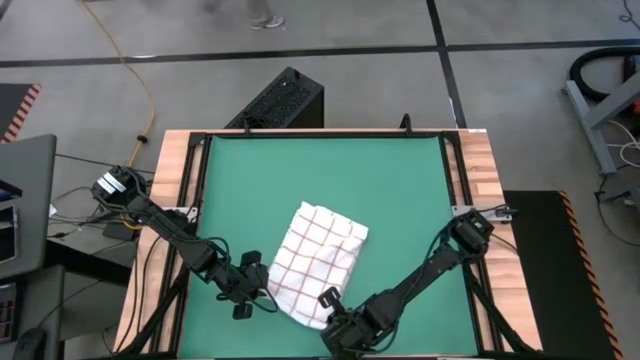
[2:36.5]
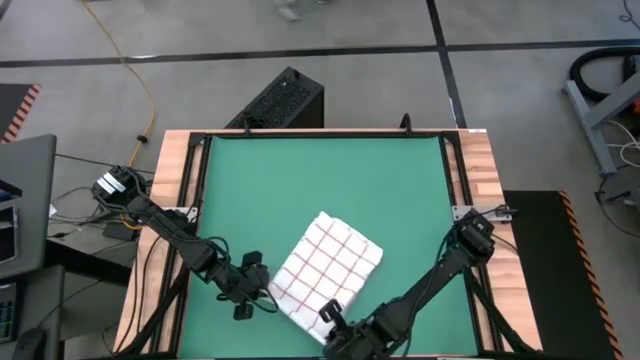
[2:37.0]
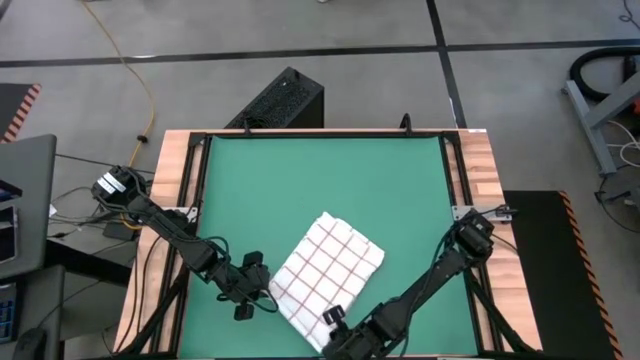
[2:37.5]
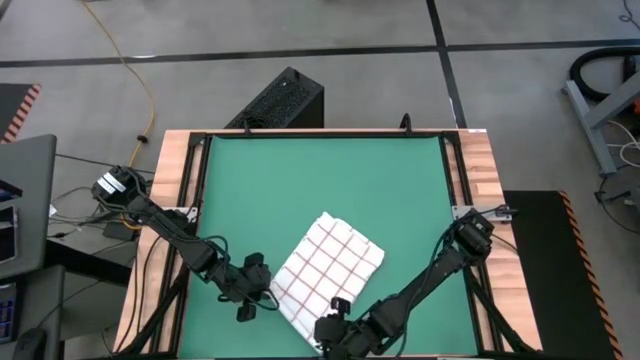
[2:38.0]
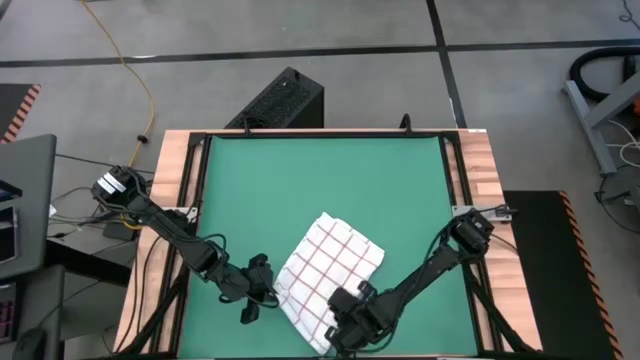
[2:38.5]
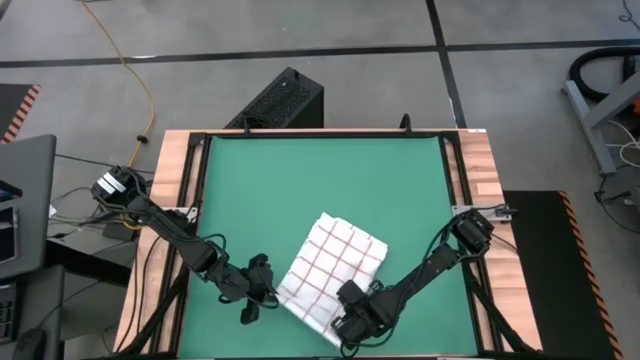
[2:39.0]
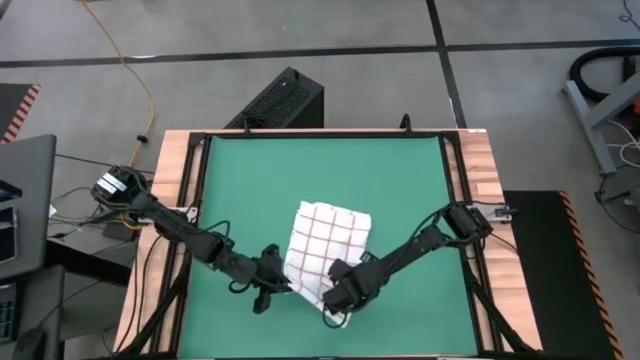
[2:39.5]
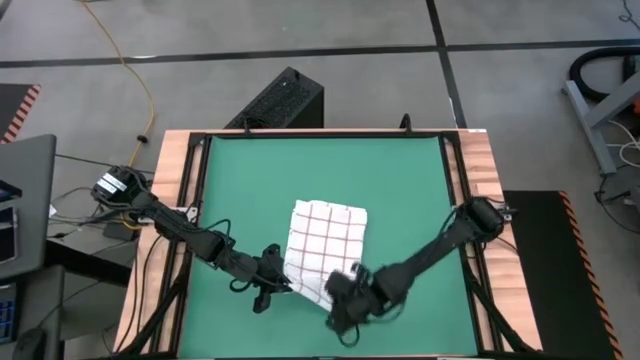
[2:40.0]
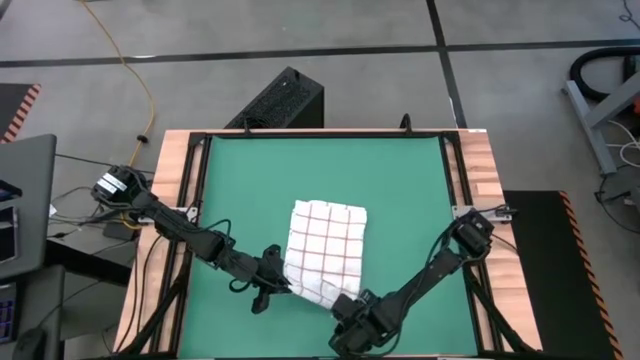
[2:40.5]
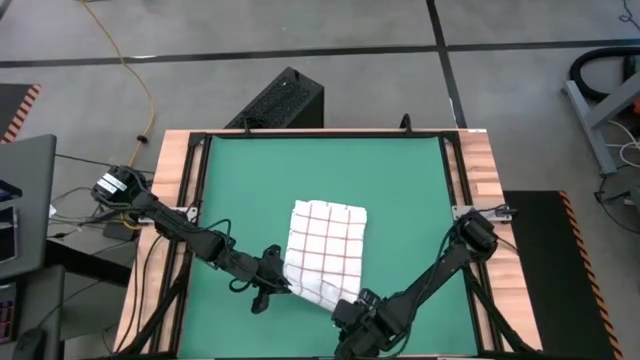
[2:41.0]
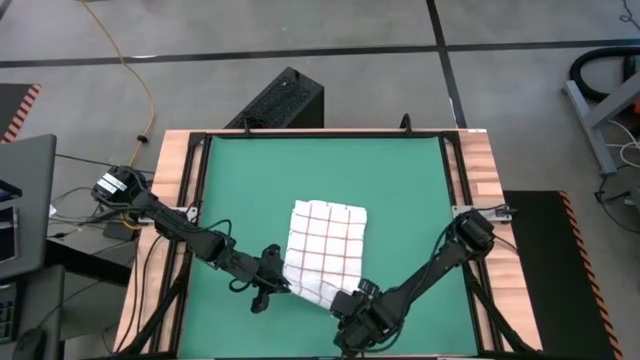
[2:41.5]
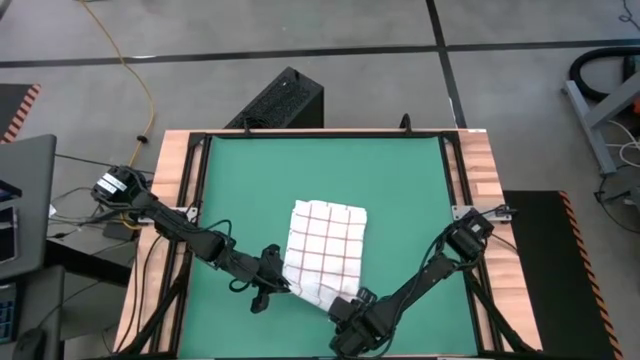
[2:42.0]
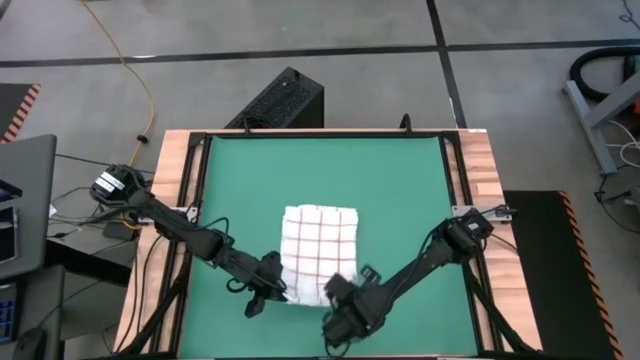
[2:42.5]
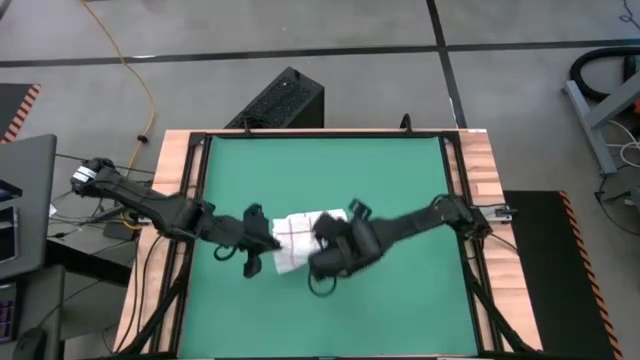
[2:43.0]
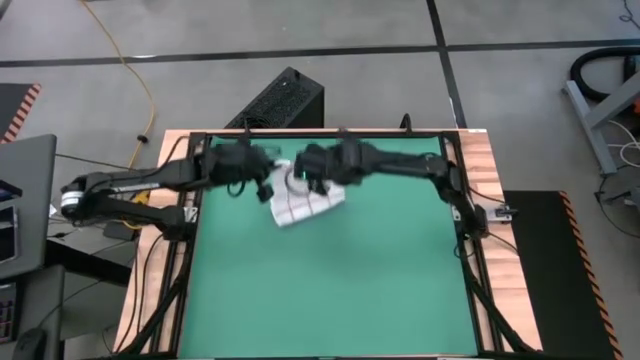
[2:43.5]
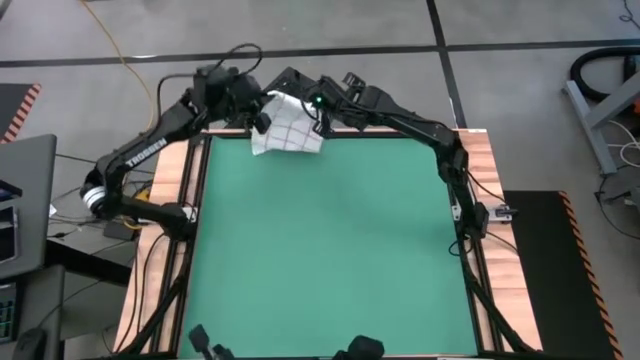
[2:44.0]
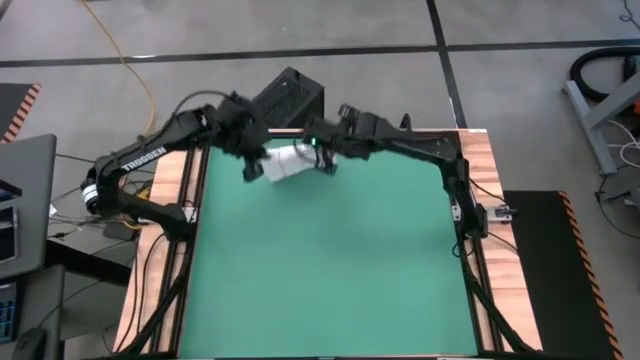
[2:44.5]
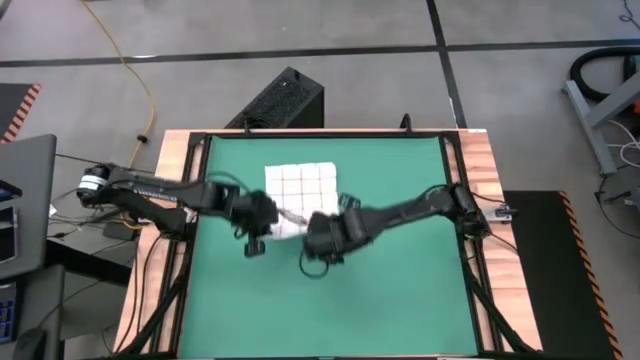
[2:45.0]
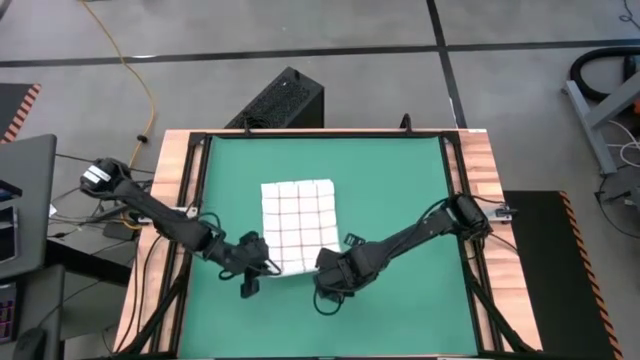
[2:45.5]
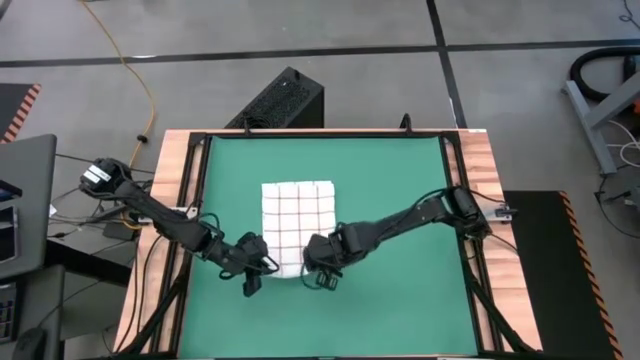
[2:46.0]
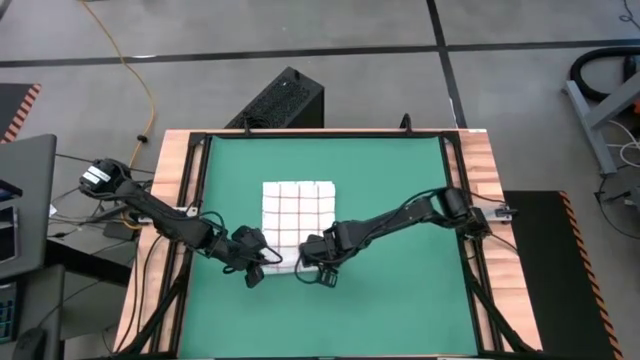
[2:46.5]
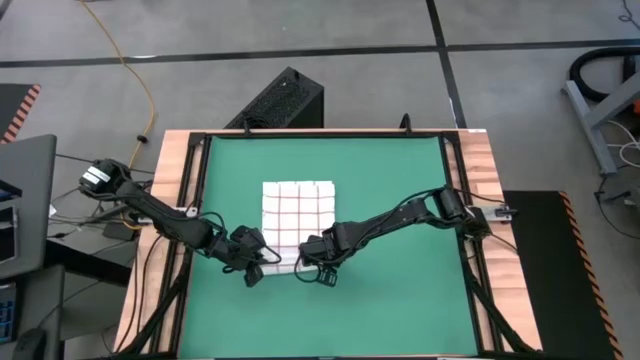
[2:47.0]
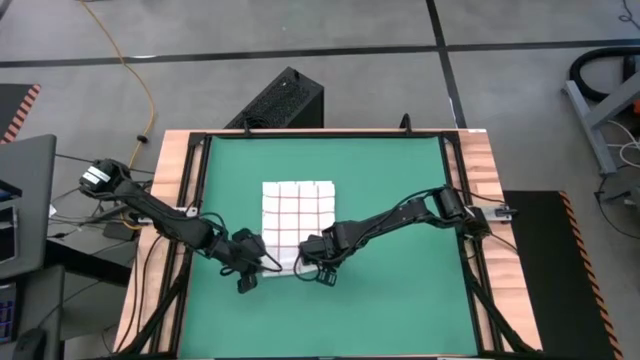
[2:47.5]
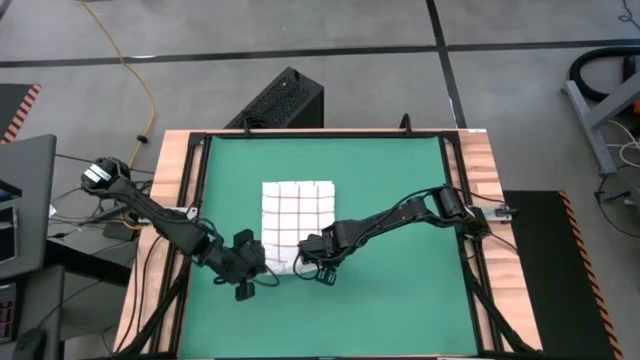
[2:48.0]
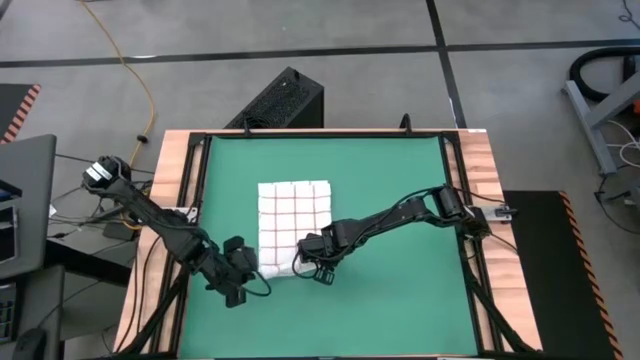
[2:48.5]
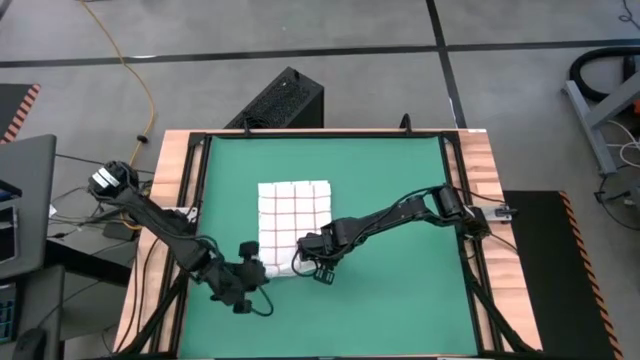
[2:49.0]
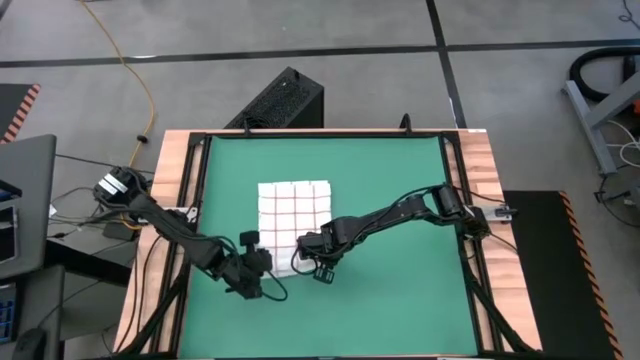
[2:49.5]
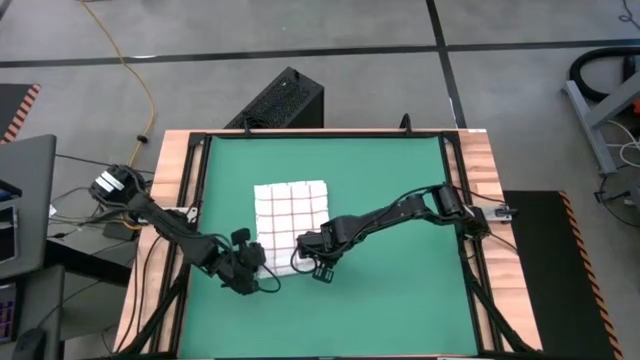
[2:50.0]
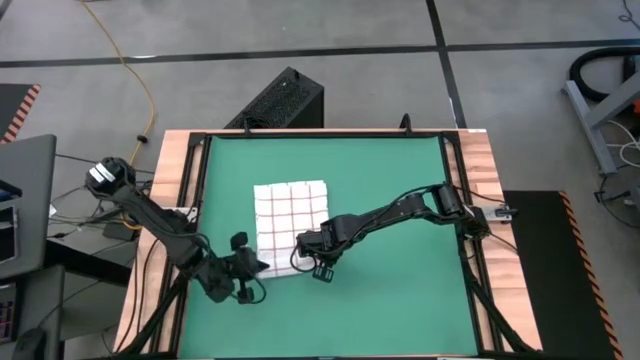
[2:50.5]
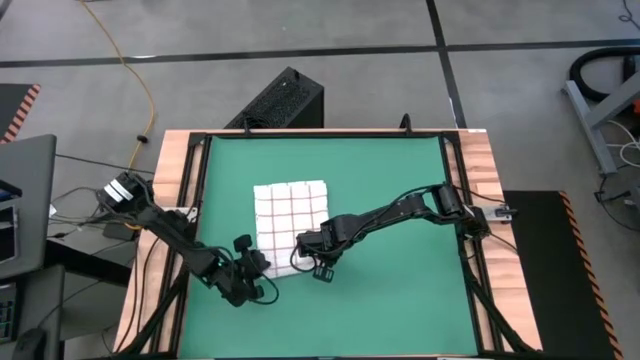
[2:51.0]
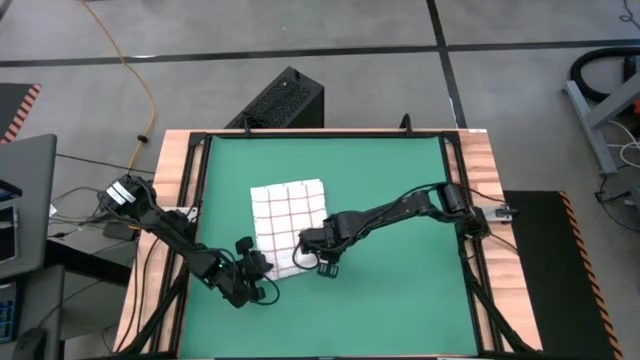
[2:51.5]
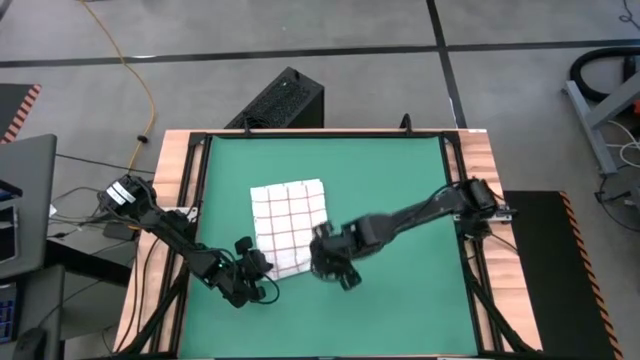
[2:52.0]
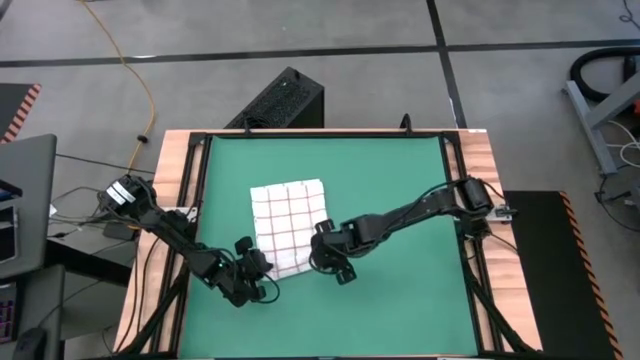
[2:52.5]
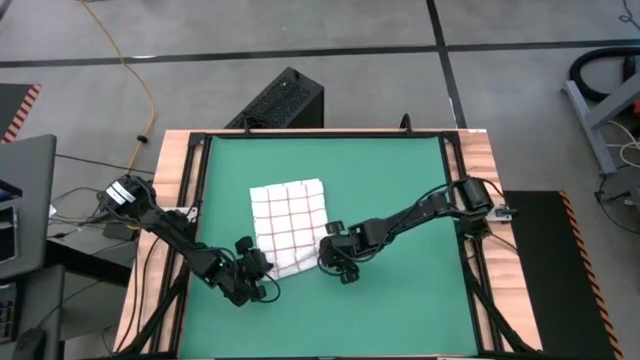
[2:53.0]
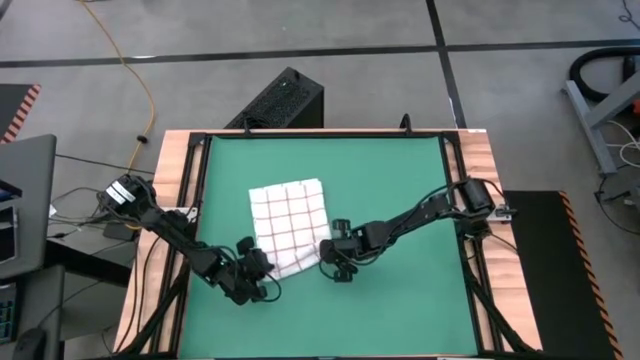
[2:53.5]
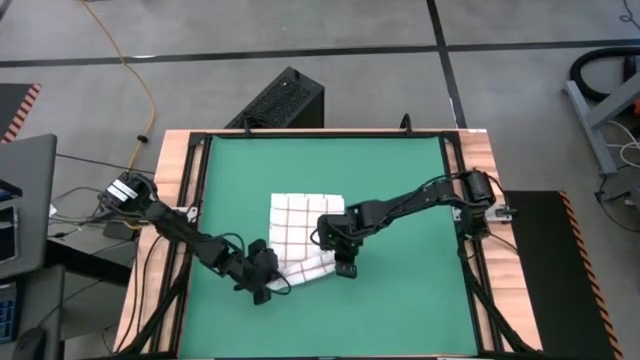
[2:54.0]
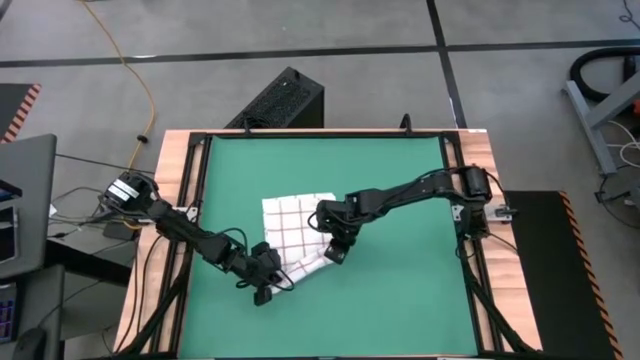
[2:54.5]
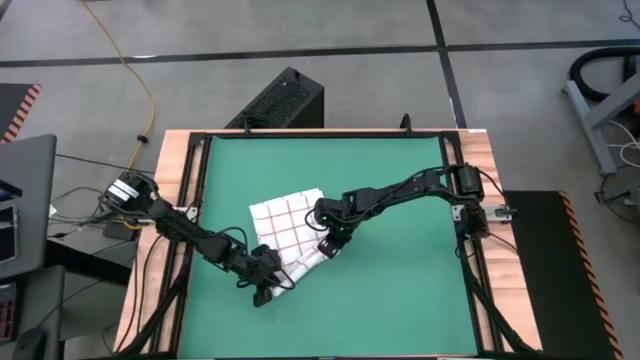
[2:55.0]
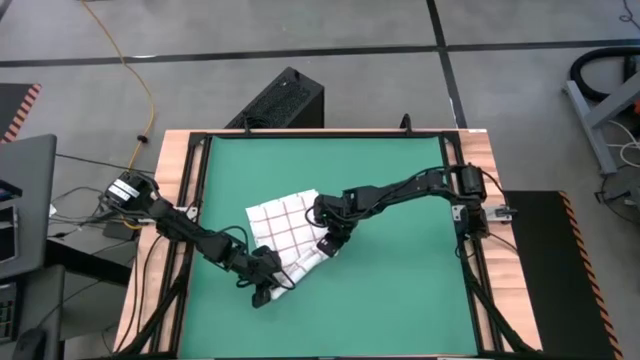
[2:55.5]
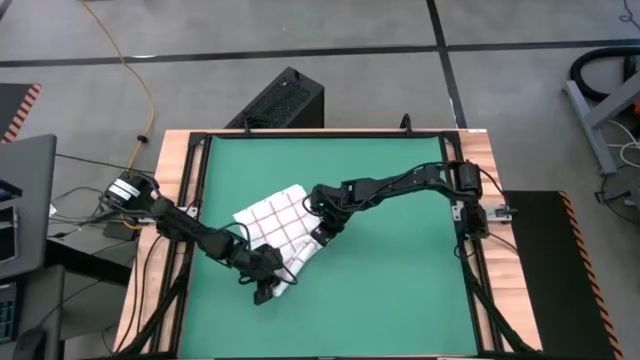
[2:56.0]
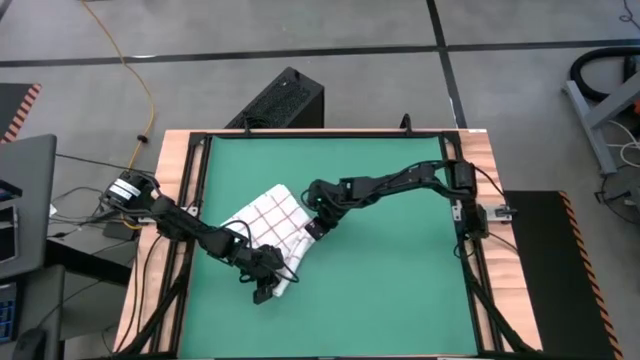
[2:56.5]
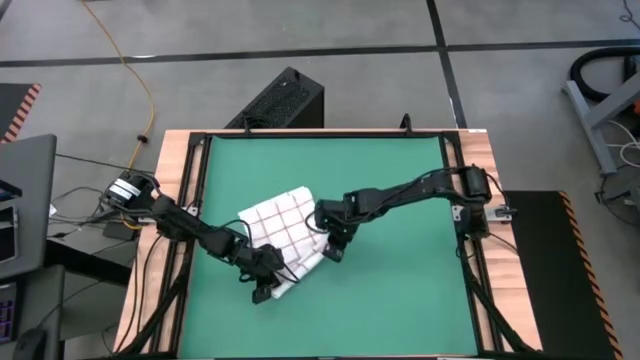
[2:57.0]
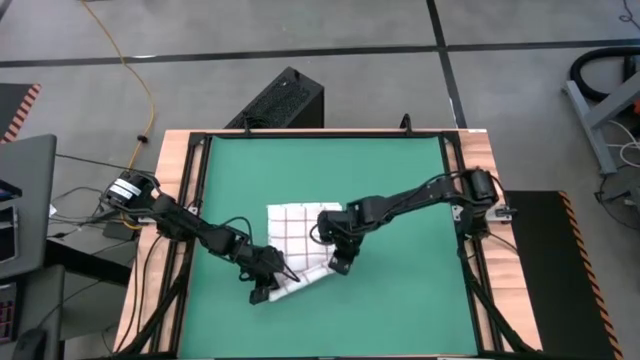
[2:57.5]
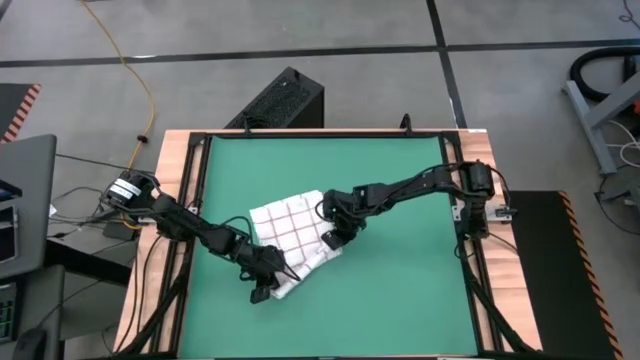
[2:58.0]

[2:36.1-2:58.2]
Task: Roll towel into tight, uniform cylinder
Roll the white patterned towel
